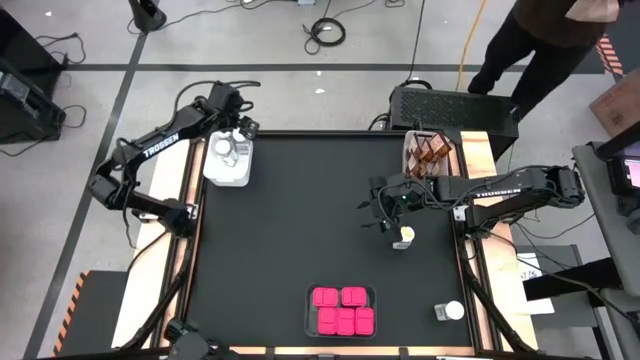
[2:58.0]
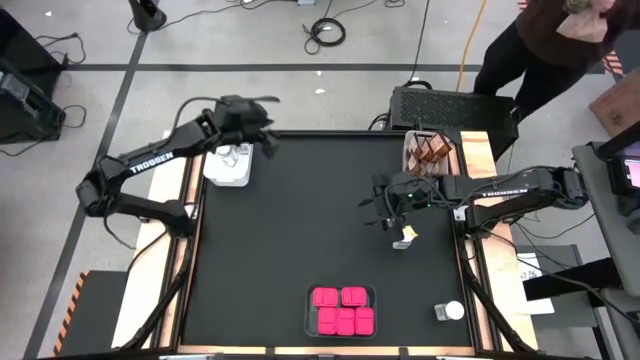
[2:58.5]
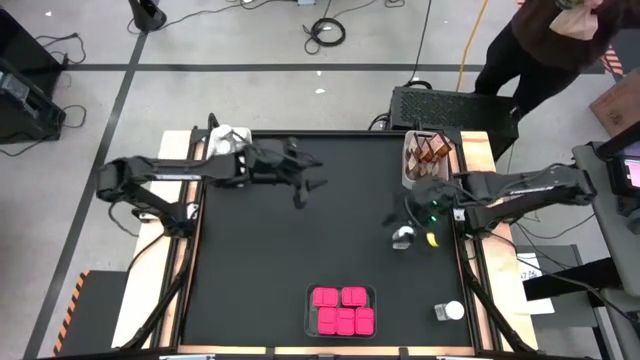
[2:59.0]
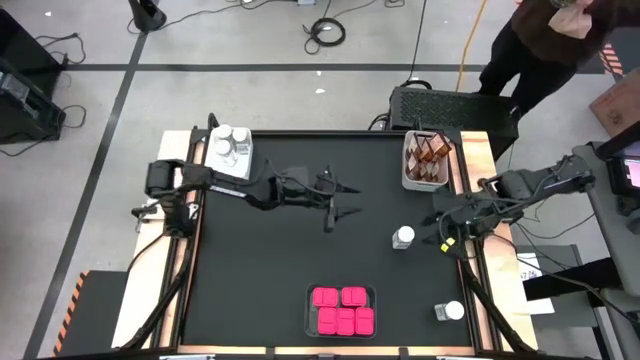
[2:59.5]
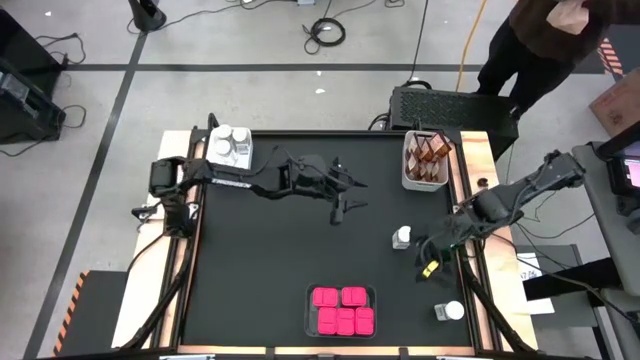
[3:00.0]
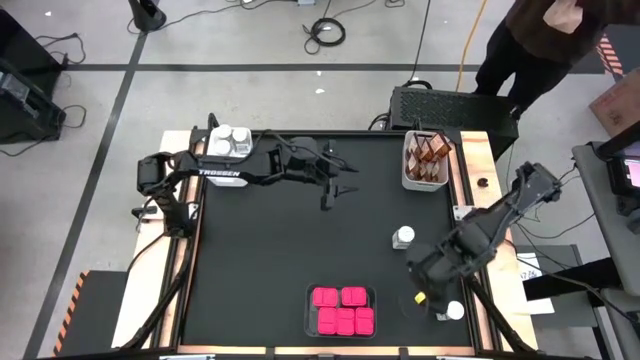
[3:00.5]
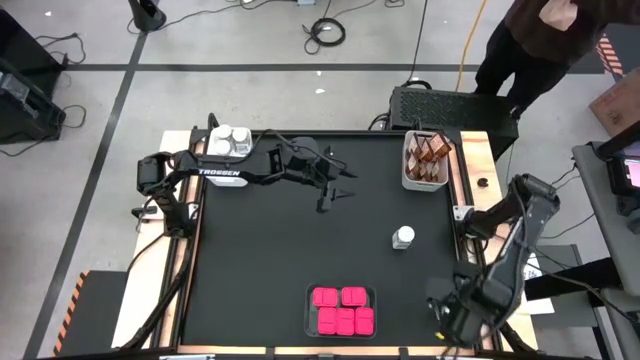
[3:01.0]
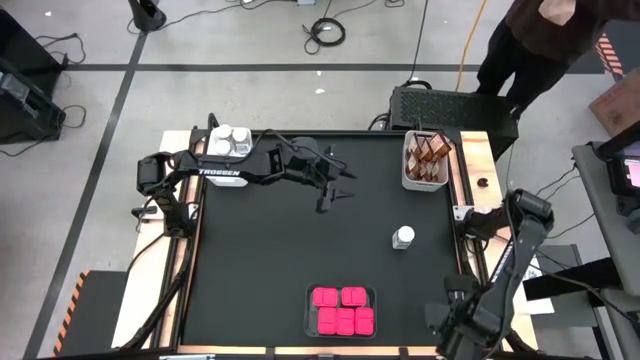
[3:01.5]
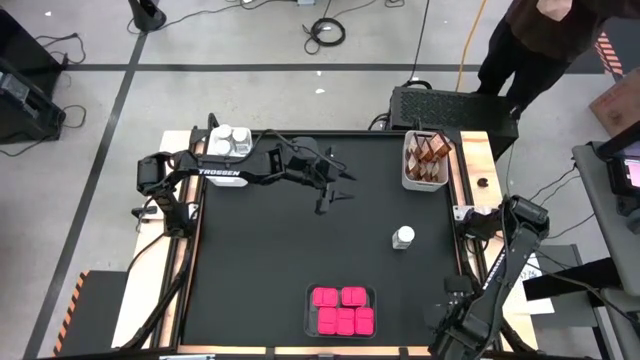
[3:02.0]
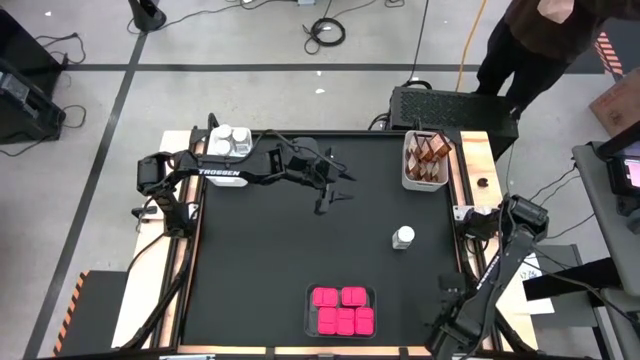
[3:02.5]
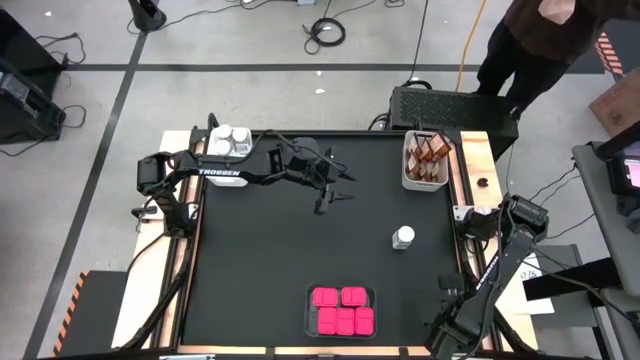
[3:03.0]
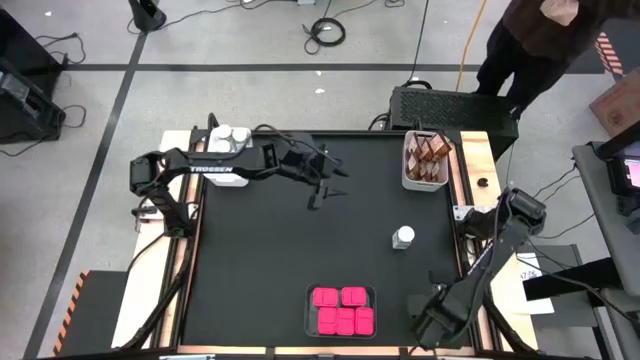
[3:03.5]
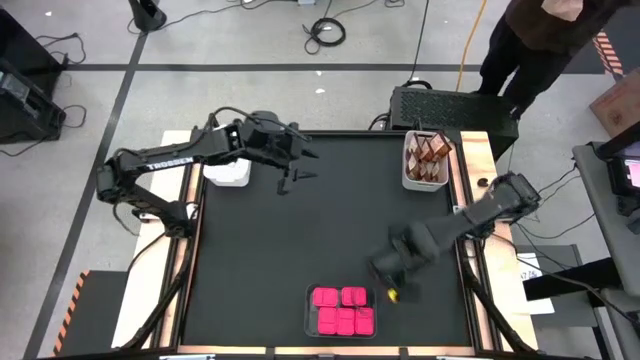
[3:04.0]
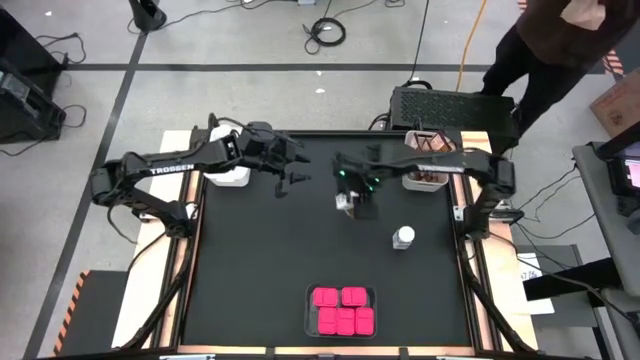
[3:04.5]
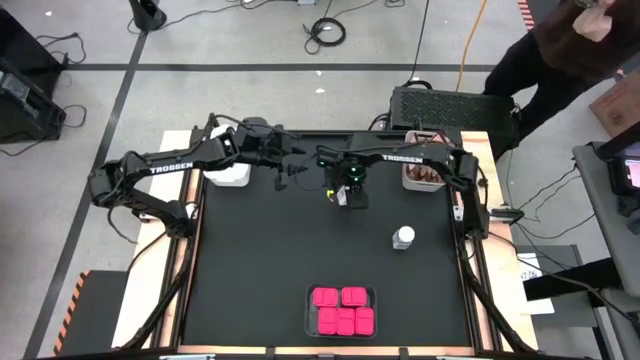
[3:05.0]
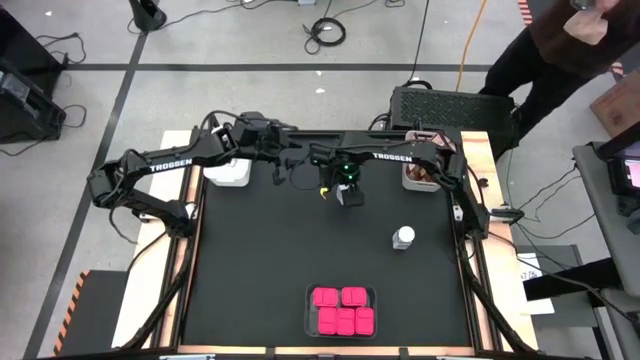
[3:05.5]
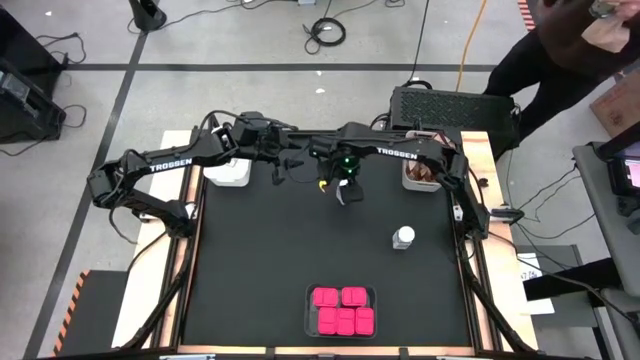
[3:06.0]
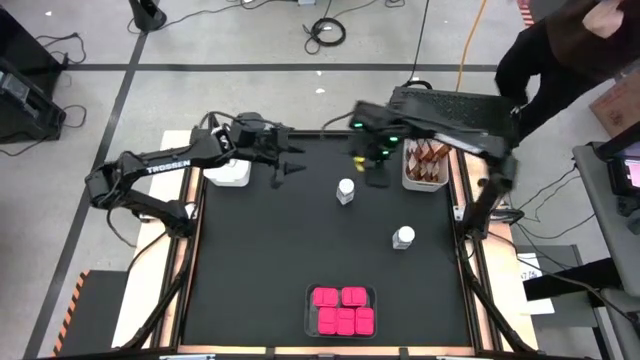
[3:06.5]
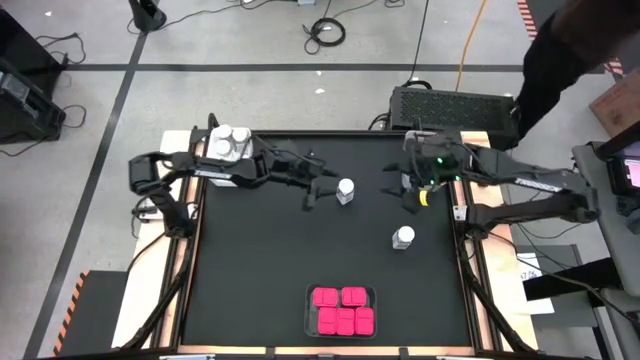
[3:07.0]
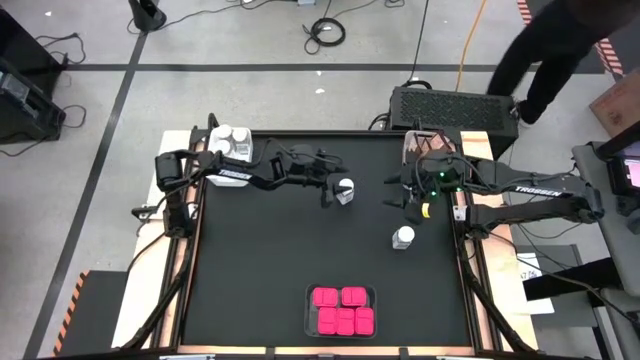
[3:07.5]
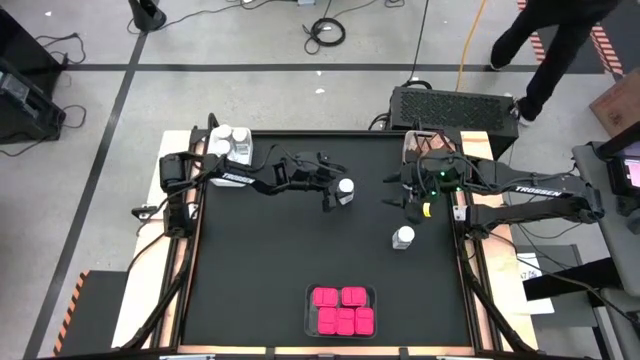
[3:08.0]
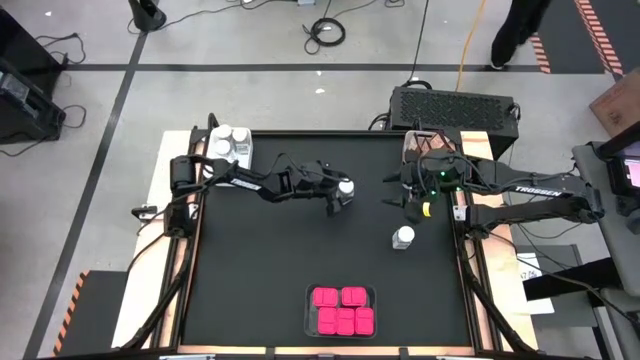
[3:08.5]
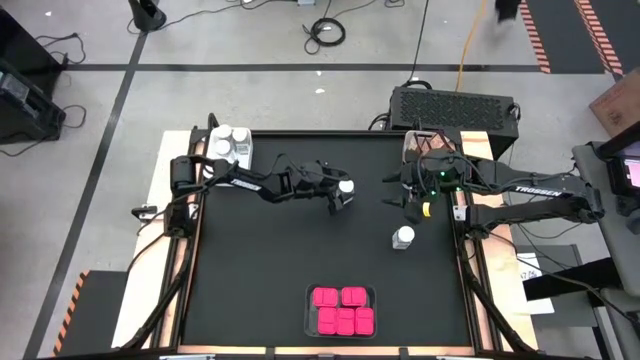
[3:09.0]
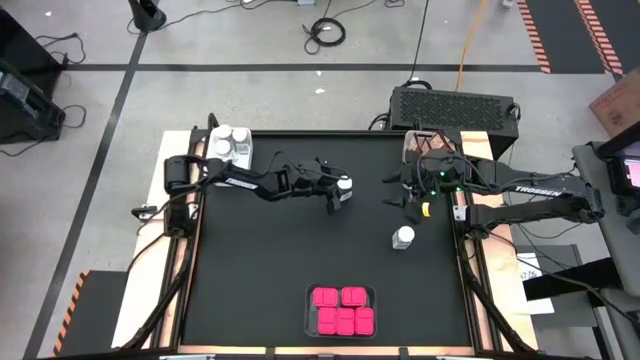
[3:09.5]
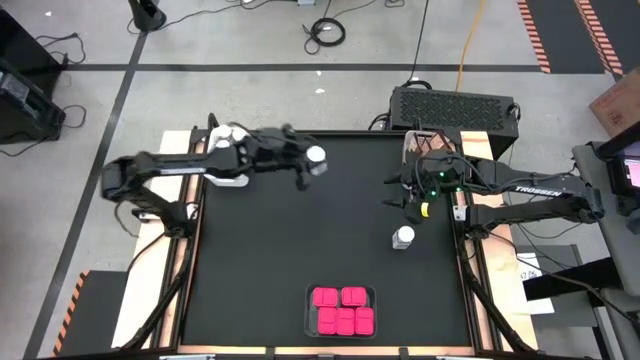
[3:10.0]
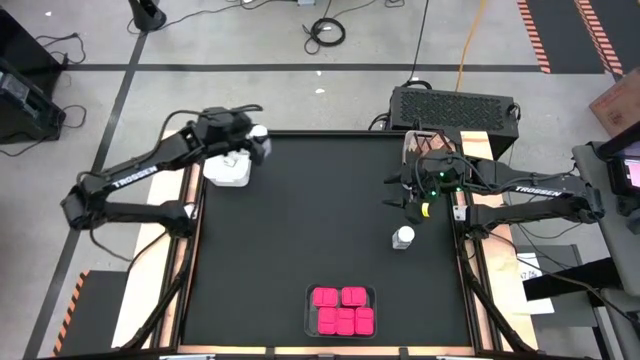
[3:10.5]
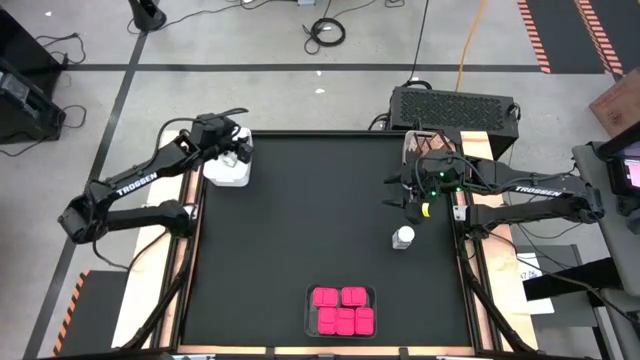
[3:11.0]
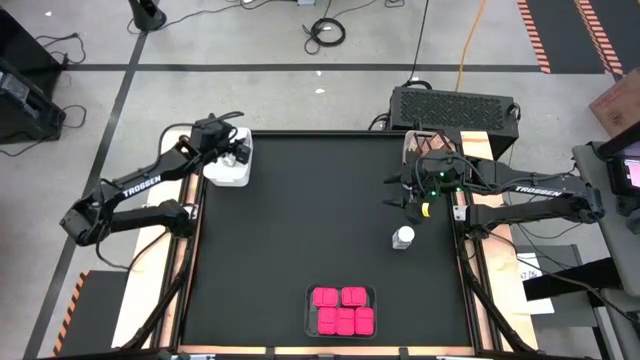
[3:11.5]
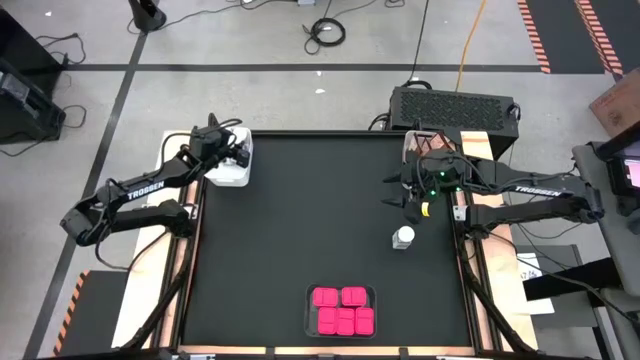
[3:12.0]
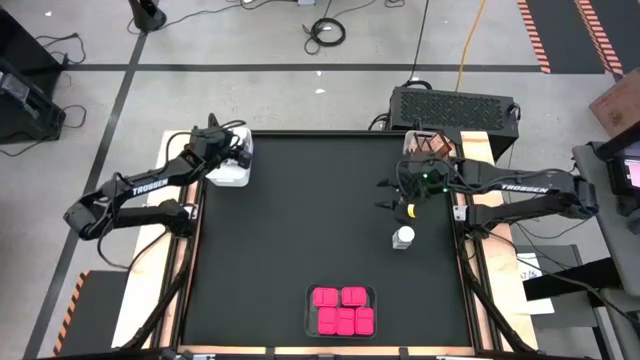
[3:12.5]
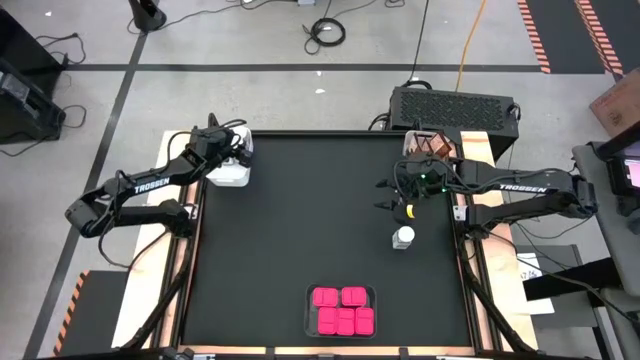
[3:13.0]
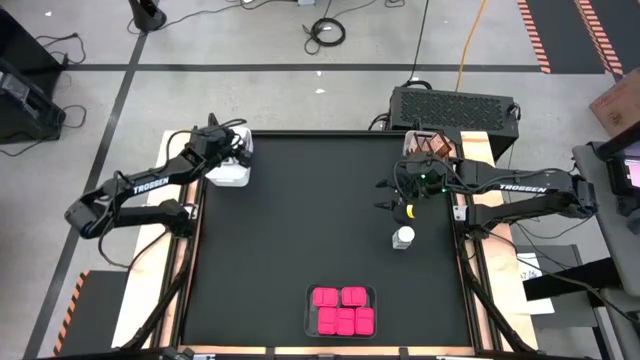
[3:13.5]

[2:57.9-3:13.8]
Task: Sort spices by type
Put the white seasoning bottle into the left white bin

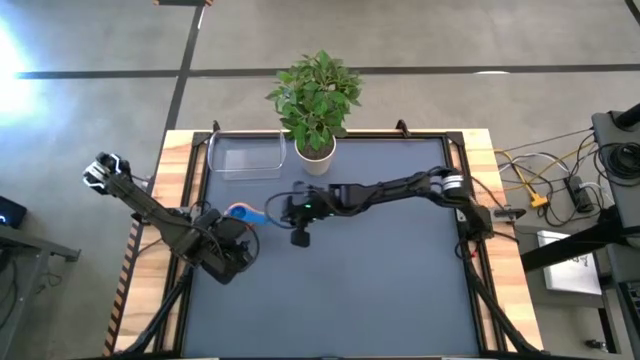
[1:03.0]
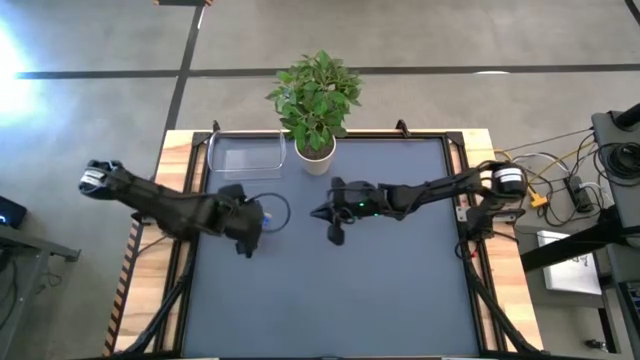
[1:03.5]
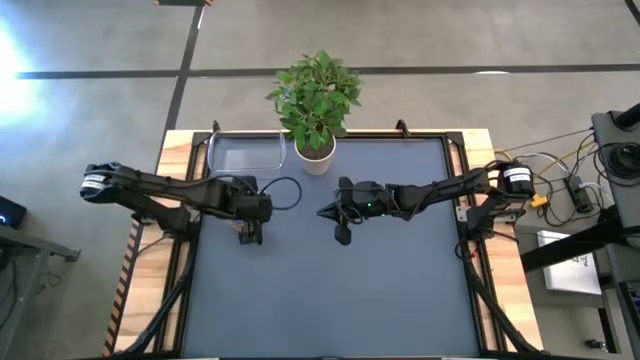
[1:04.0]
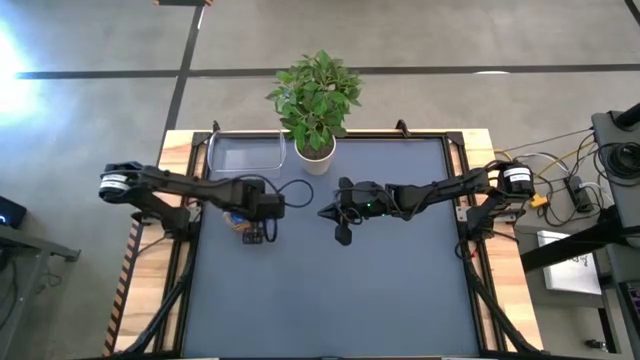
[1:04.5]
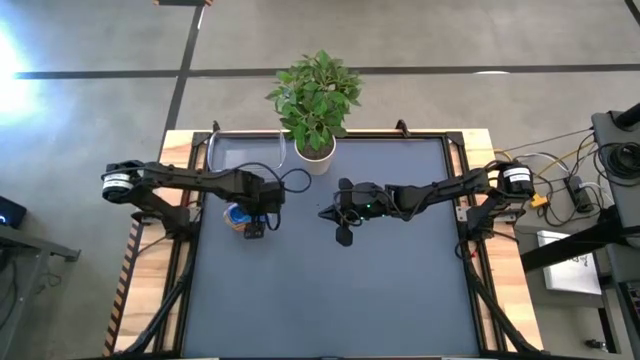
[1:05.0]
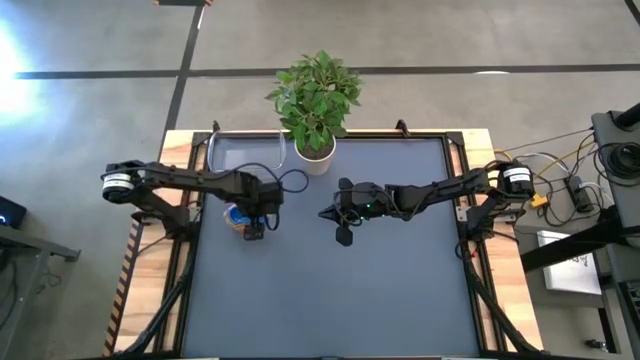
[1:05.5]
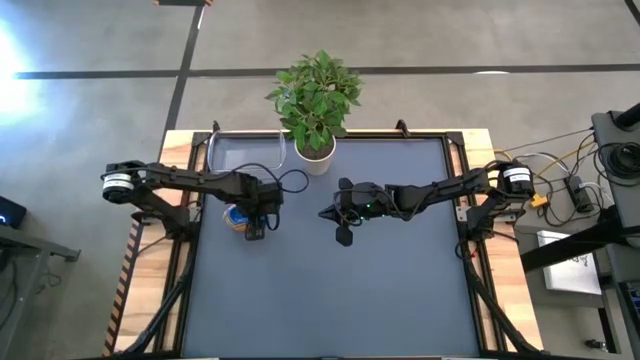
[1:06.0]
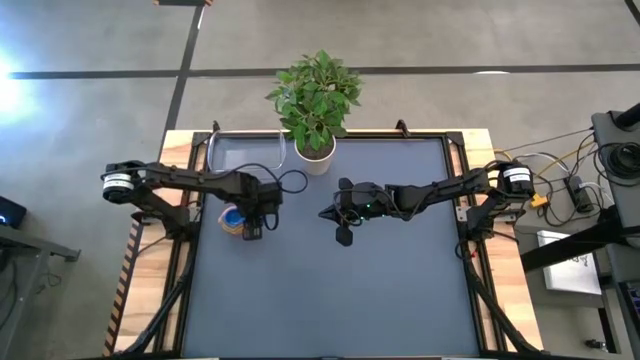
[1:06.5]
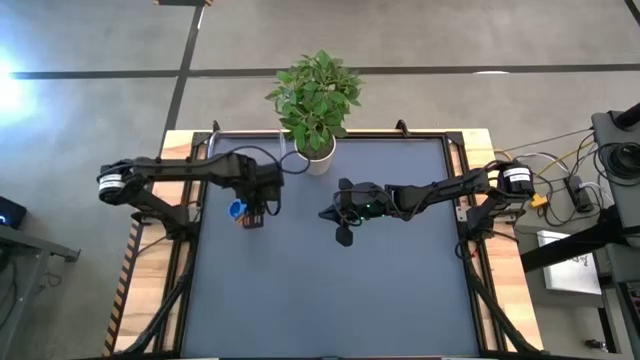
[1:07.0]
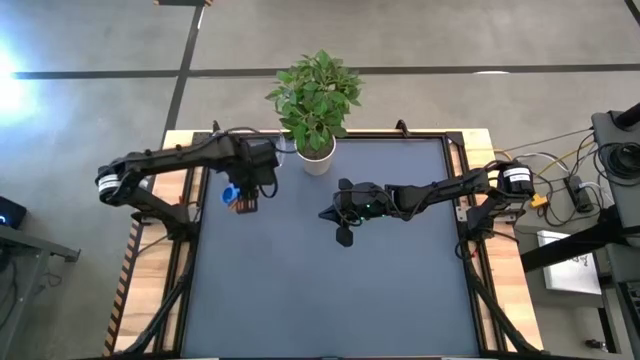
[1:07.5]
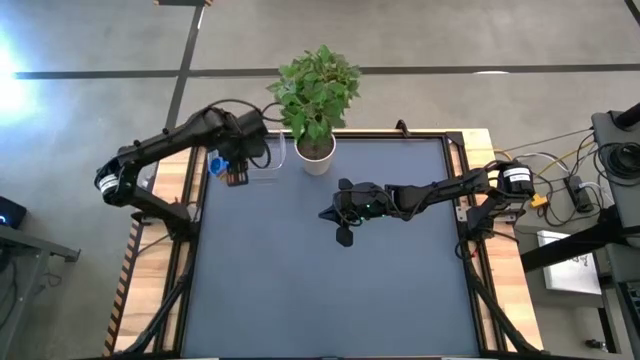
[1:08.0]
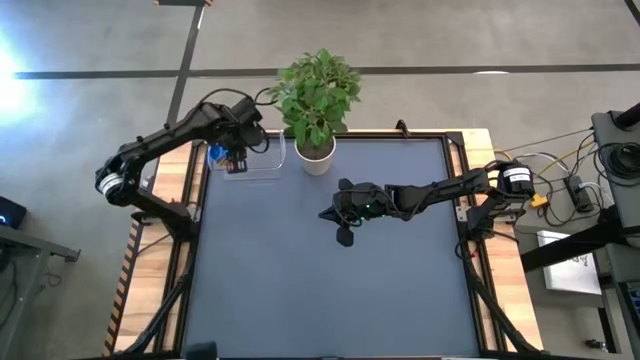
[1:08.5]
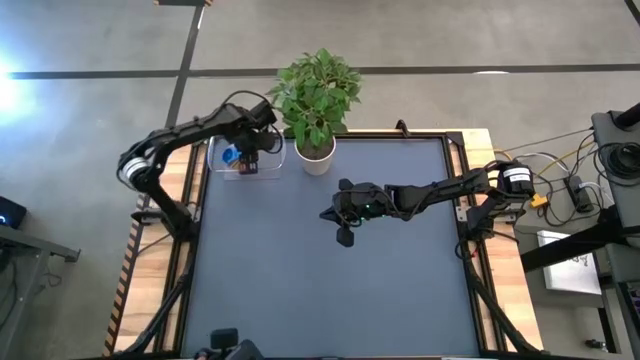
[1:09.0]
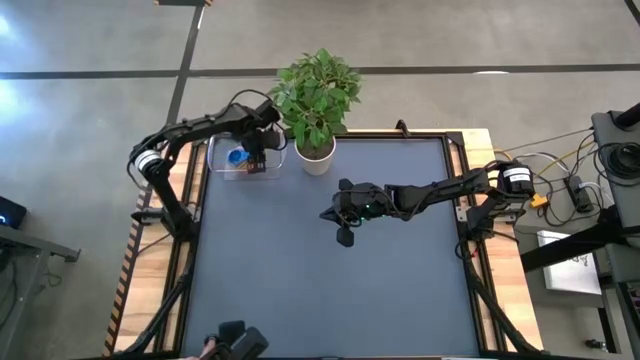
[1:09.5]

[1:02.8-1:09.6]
Task: Nest measuring cups in basket
Put the nested colored measuring cups into the transparent bin
